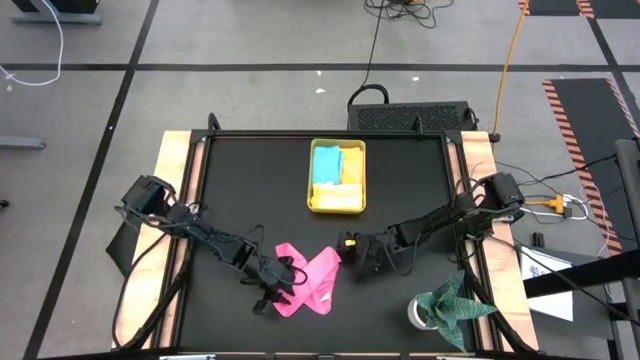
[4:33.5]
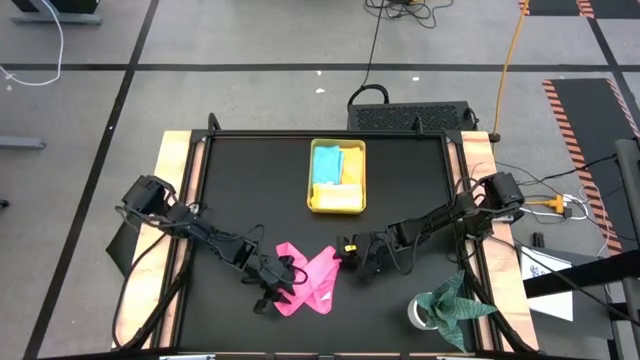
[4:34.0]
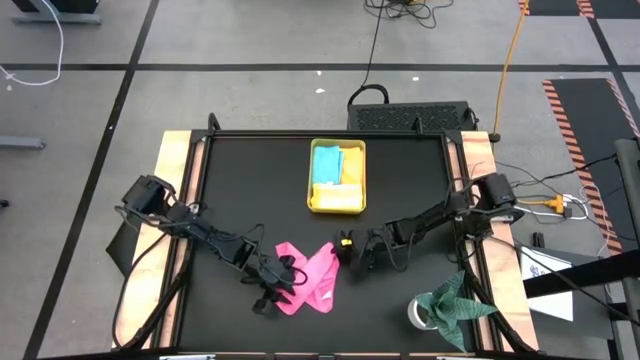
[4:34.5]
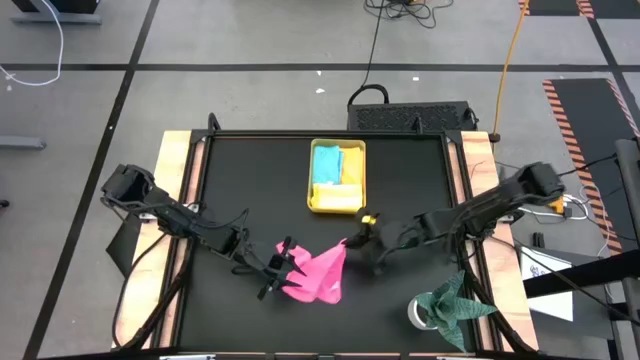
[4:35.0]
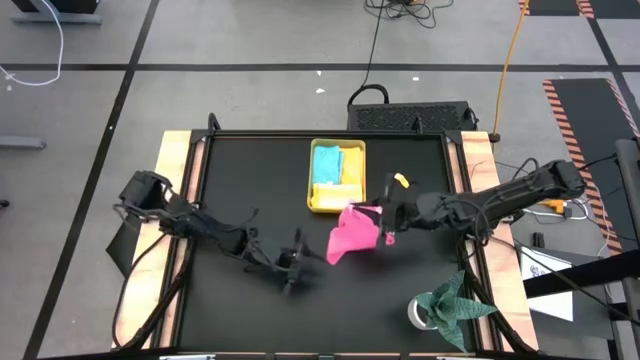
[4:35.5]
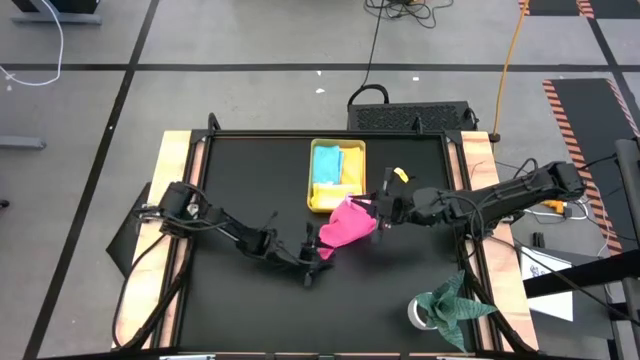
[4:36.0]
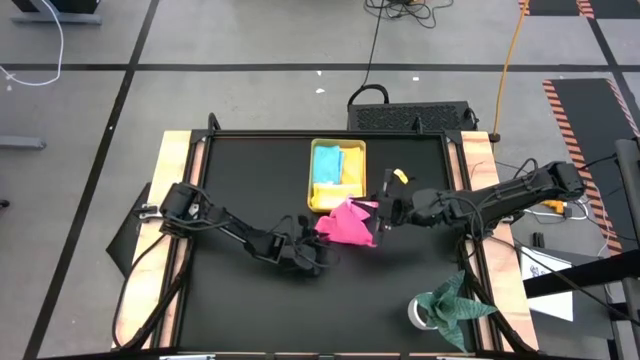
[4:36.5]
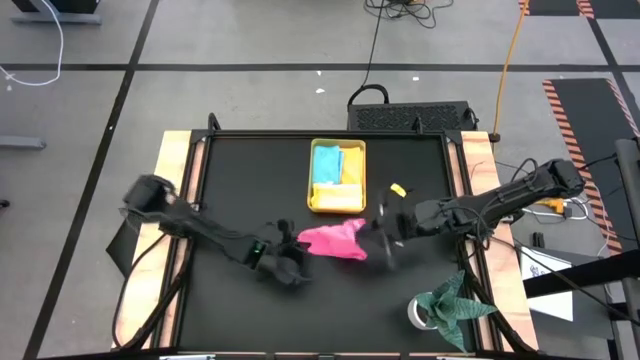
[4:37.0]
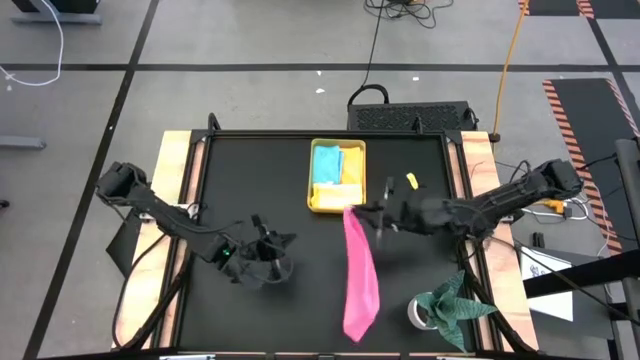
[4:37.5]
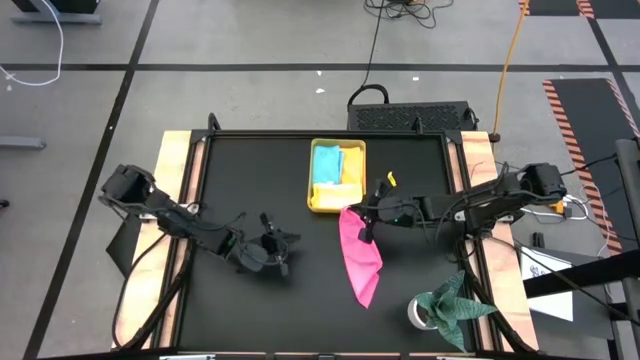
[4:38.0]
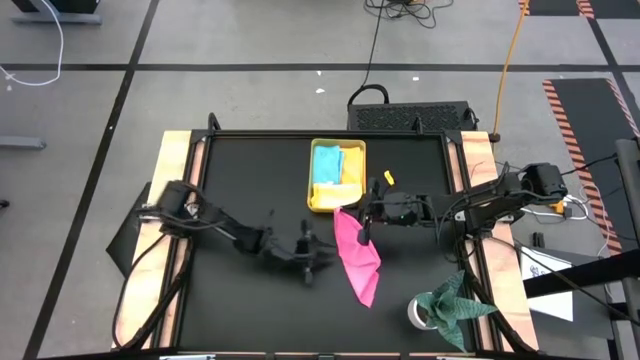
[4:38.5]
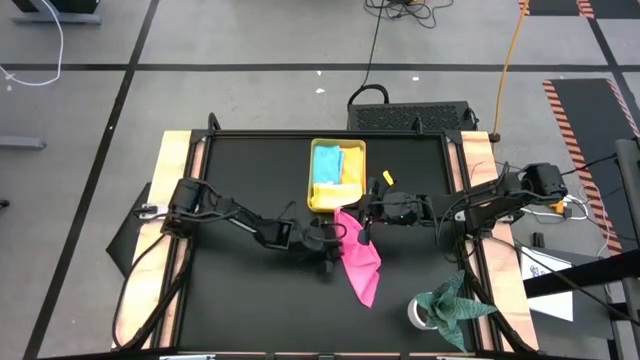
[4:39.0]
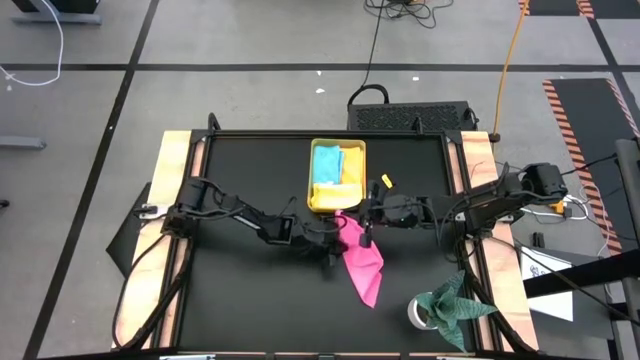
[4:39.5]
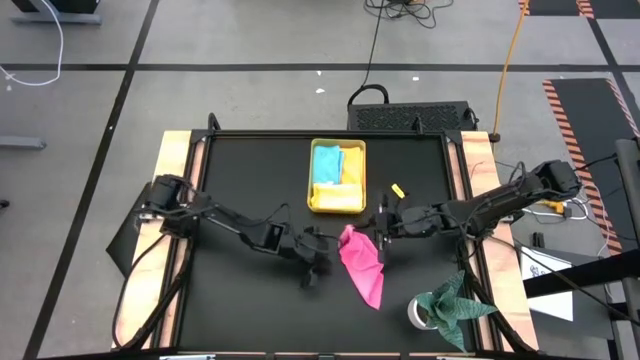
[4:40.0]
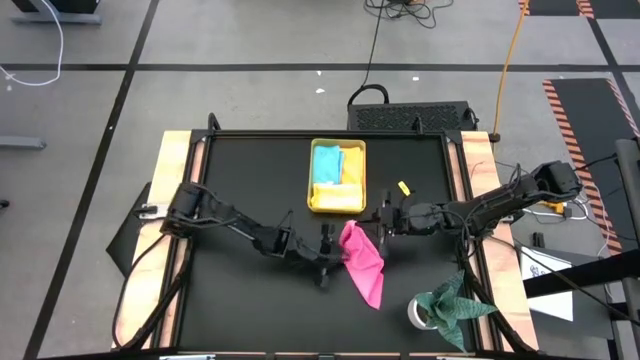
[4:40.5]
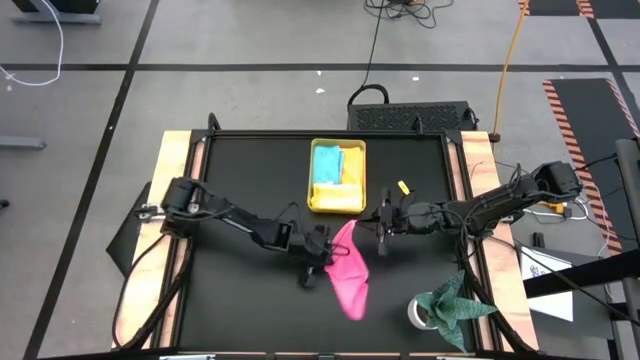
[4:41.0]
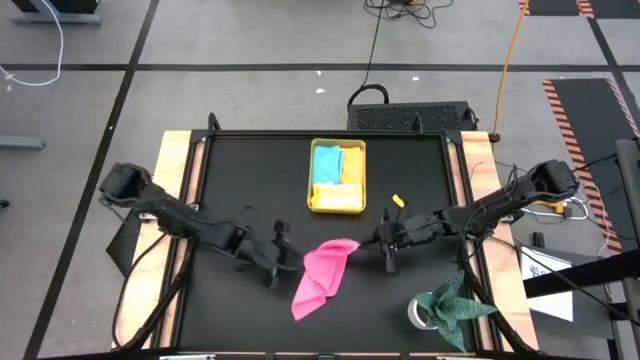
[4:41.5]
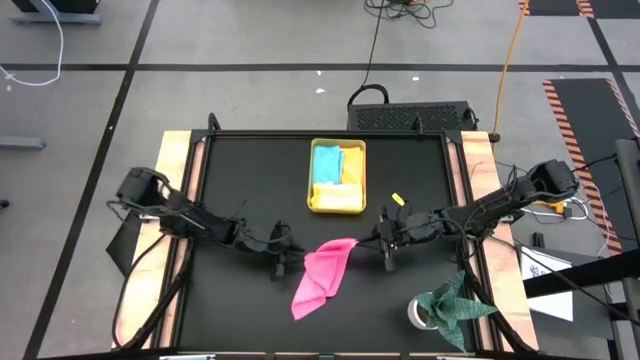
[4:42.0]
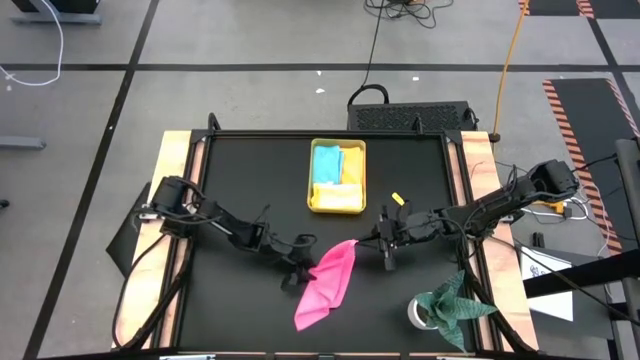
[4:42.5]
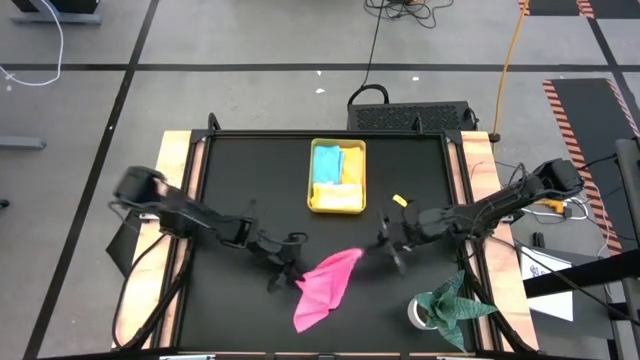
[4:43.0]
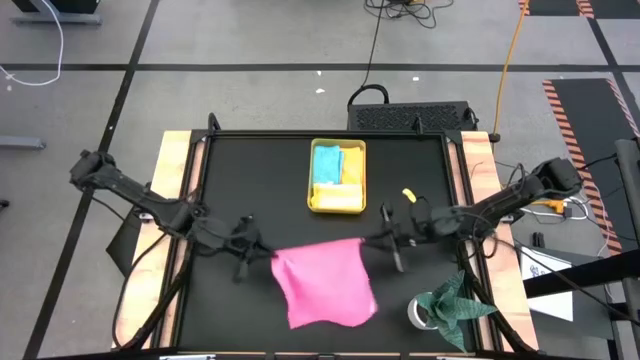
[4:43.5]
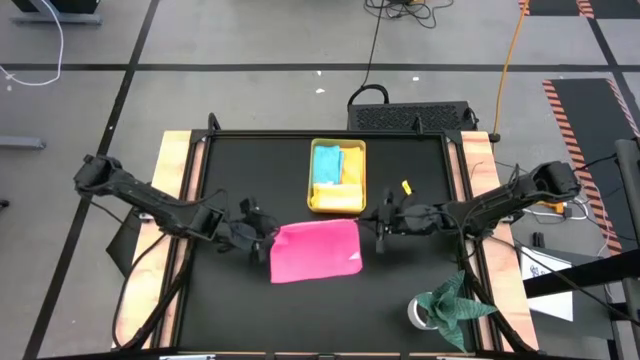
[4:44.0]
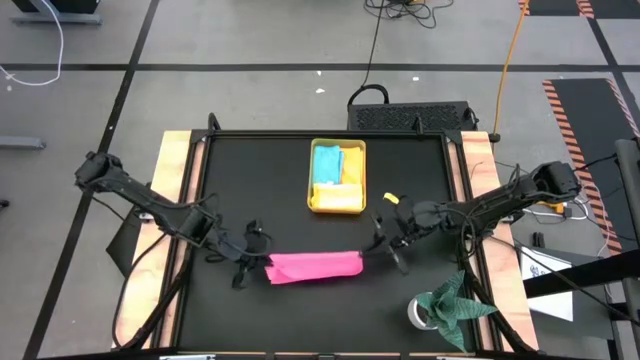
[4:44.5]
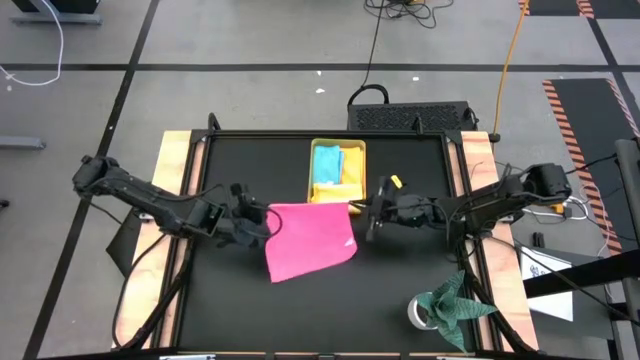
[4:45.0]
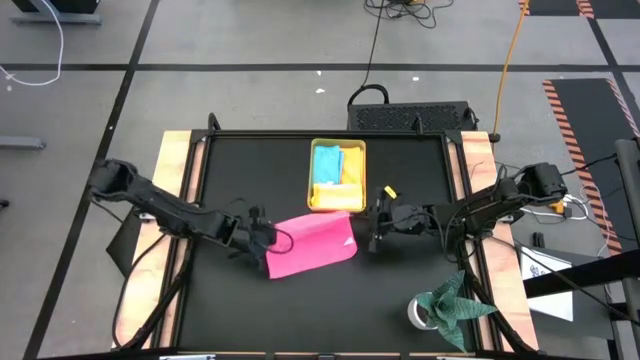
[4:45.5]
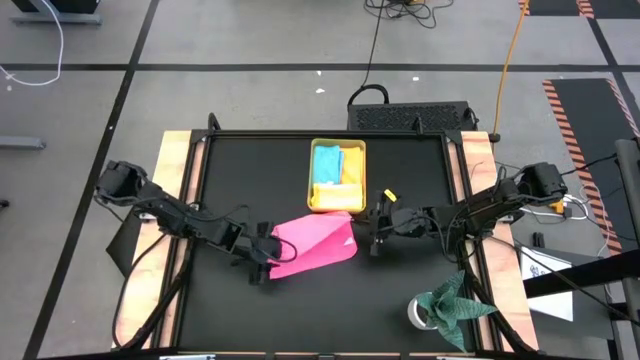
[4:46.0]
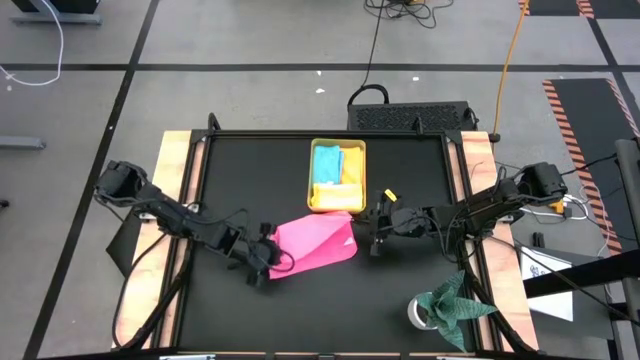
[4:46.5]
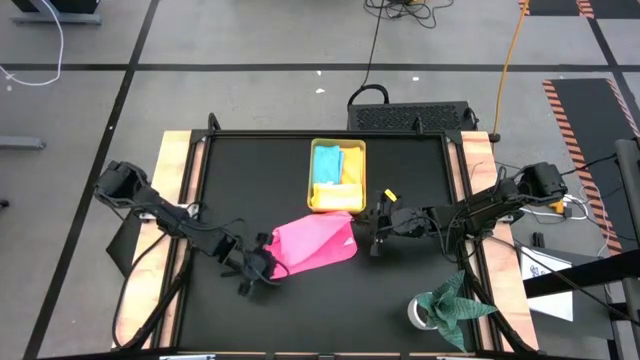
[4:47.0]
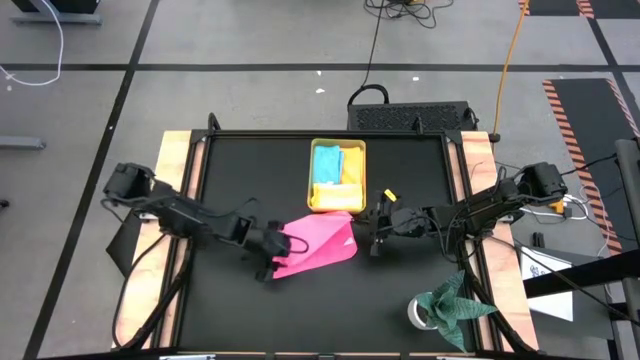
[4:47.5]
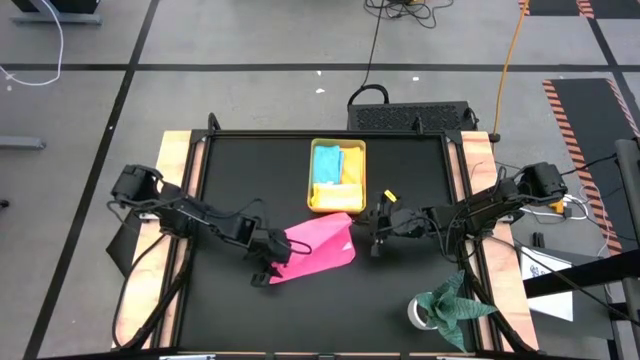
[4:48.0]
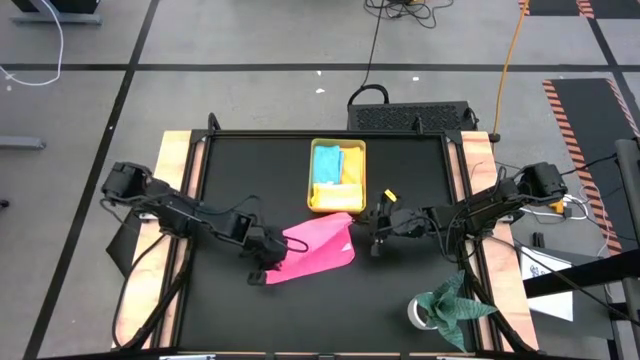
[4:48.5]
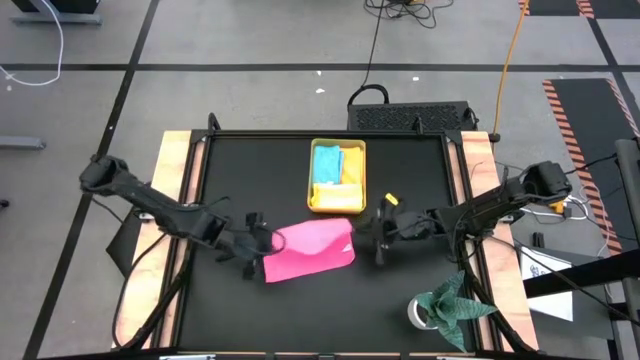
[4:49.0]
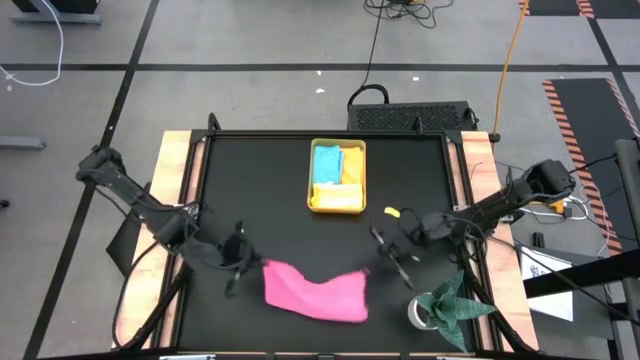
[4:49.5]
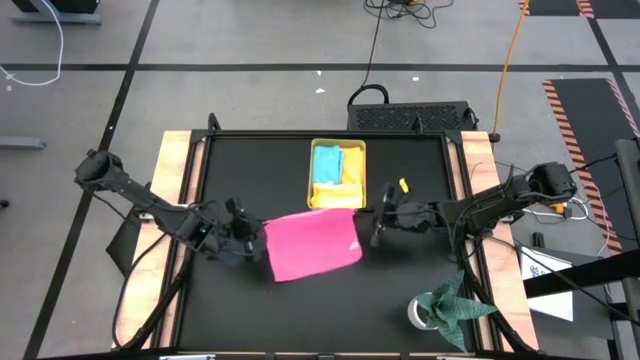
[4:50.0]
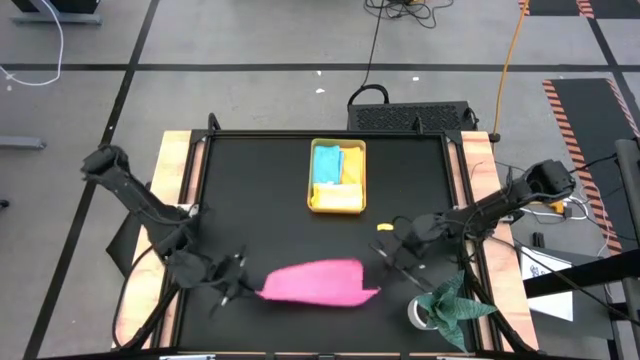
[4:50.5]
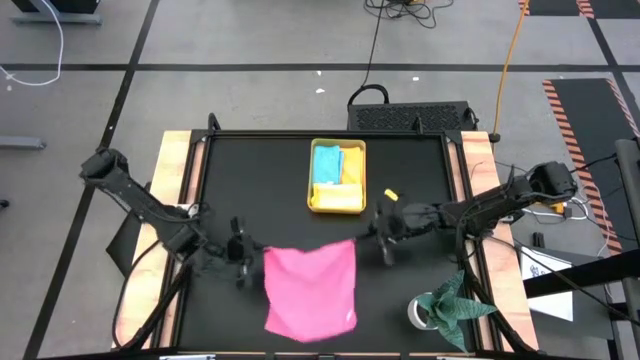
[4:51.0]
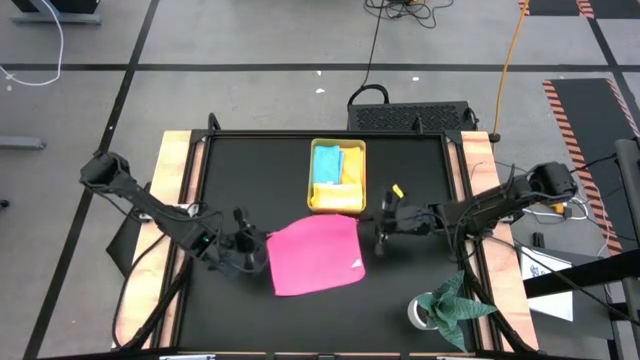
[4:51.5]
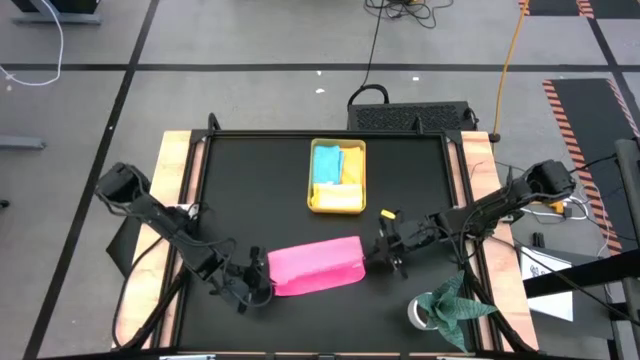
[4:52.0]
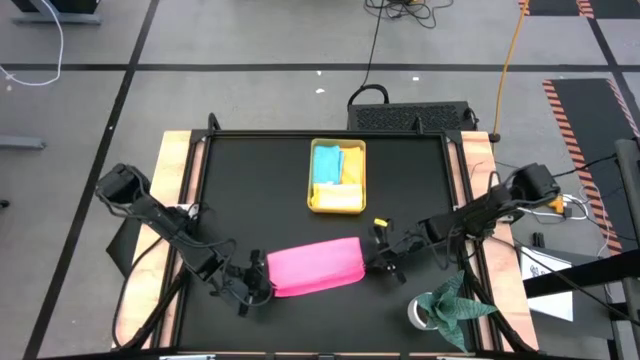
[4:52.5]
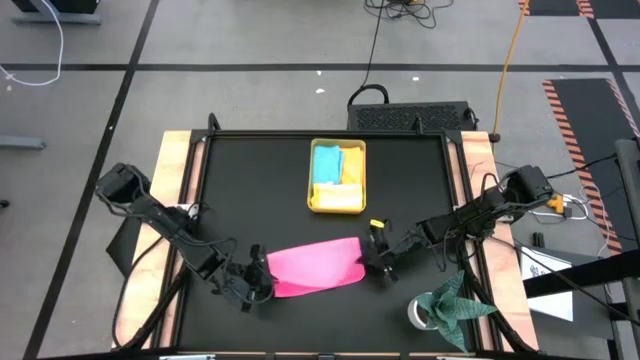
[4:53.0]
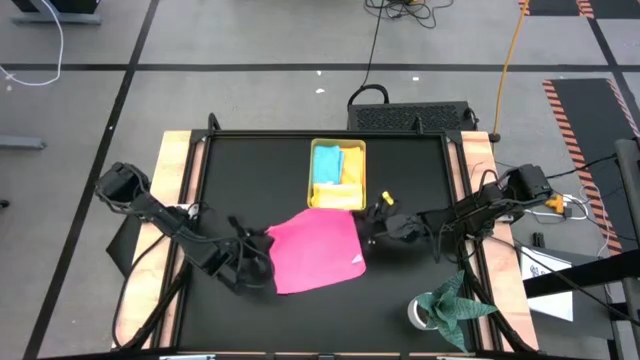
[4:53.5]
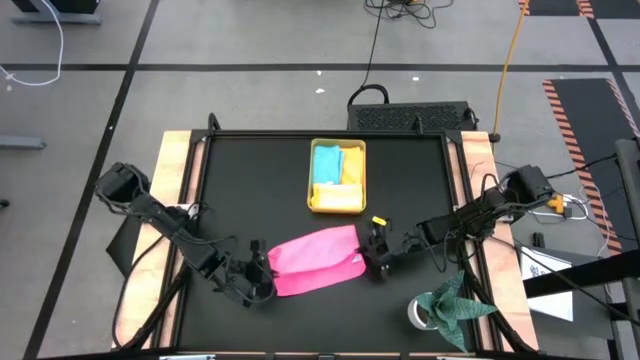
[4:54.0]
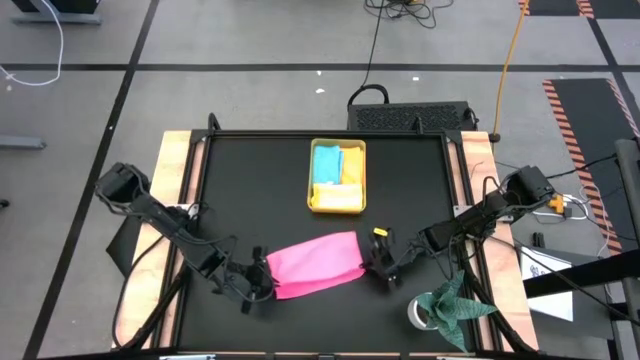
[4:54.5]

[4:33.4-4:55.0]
Task: Fold microfiber towels
Fold the pink towel
